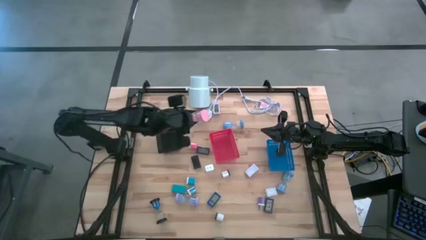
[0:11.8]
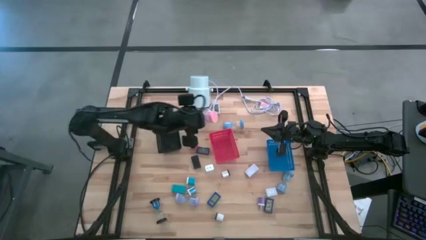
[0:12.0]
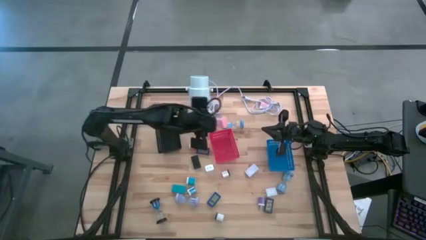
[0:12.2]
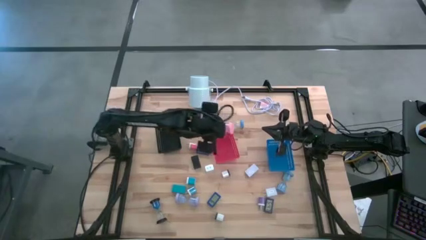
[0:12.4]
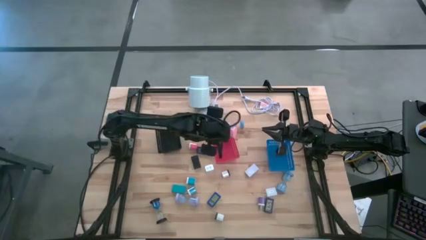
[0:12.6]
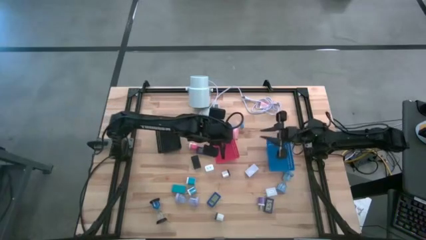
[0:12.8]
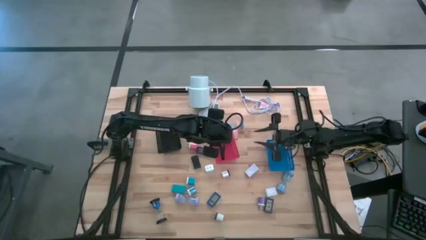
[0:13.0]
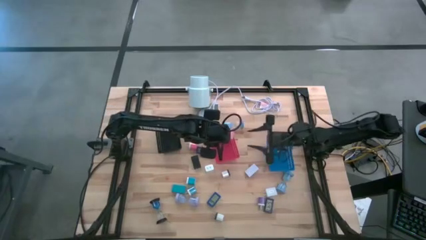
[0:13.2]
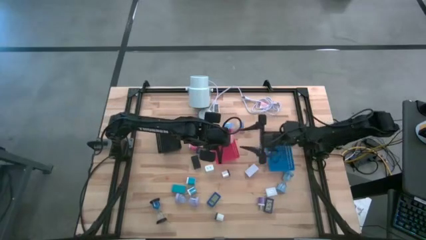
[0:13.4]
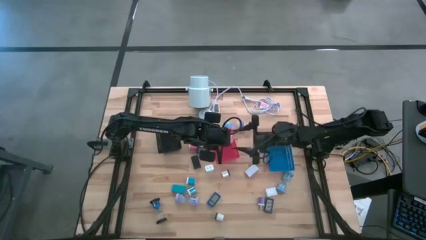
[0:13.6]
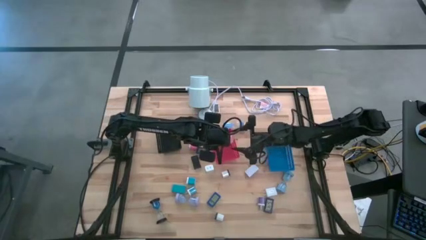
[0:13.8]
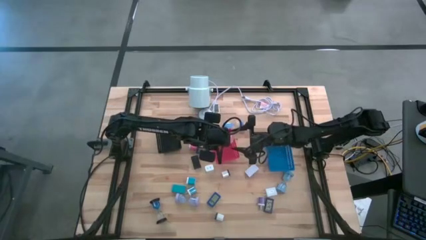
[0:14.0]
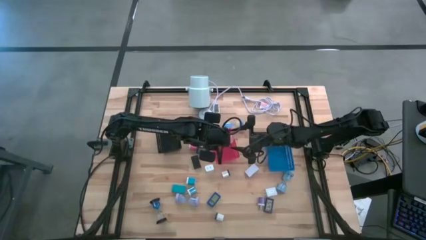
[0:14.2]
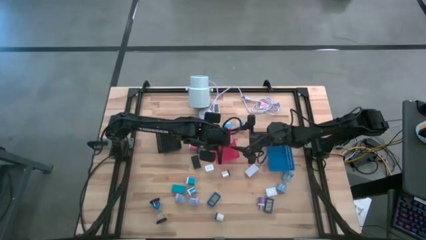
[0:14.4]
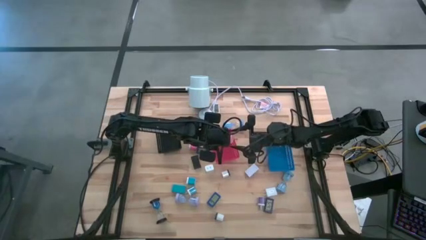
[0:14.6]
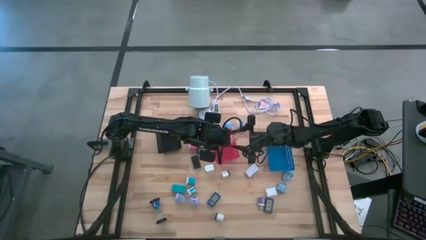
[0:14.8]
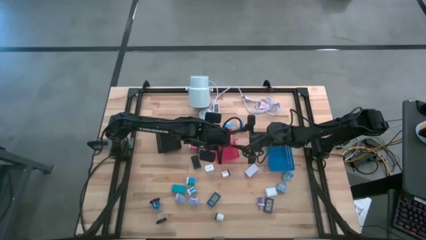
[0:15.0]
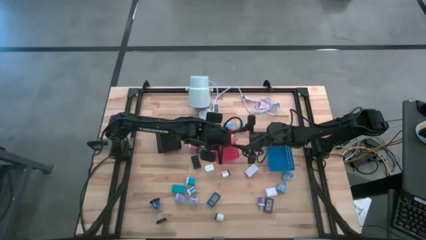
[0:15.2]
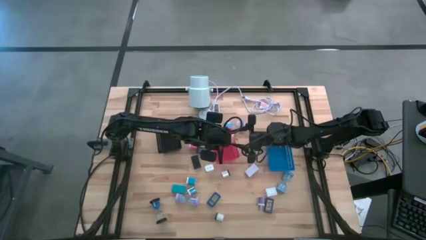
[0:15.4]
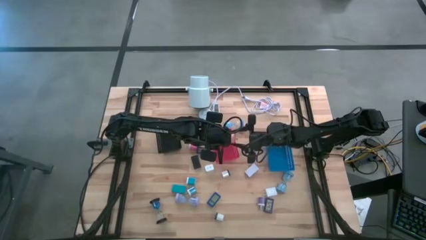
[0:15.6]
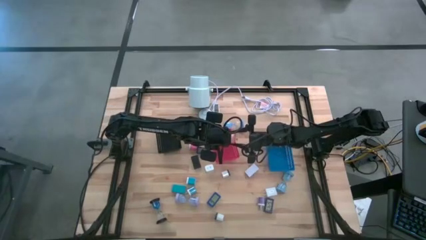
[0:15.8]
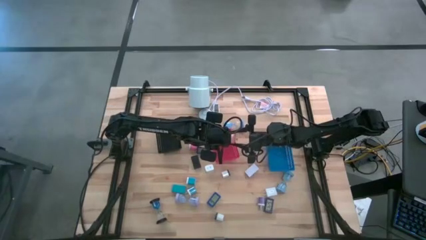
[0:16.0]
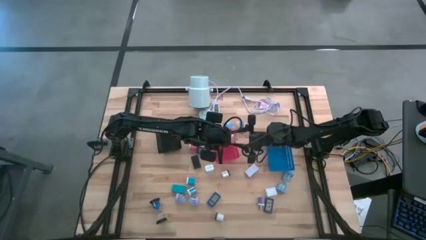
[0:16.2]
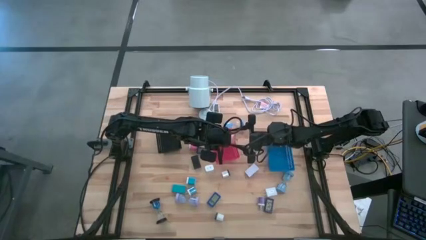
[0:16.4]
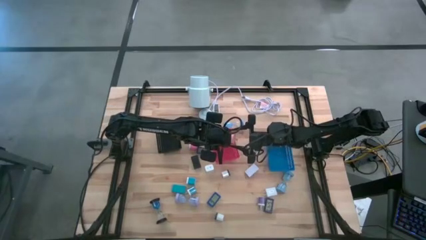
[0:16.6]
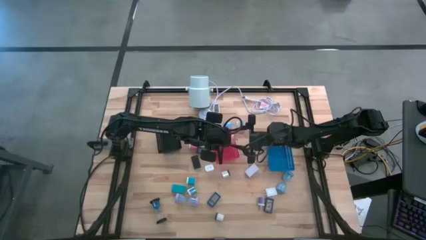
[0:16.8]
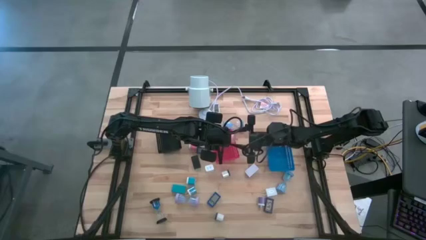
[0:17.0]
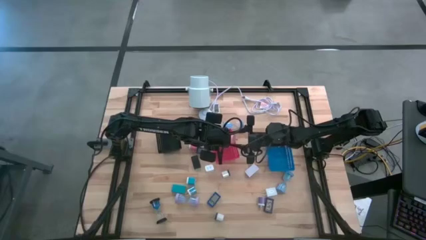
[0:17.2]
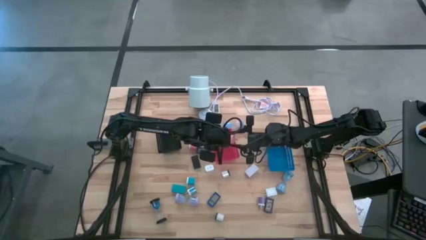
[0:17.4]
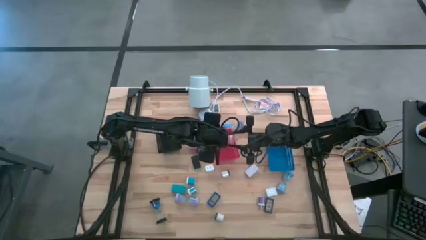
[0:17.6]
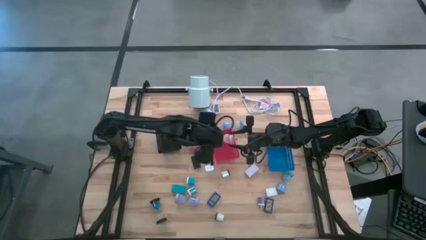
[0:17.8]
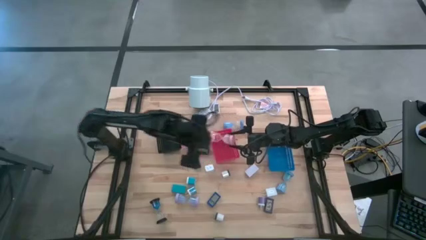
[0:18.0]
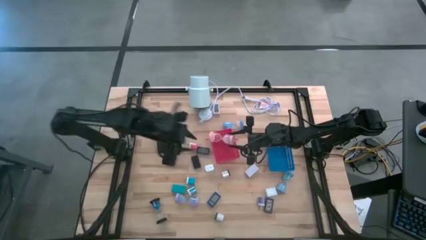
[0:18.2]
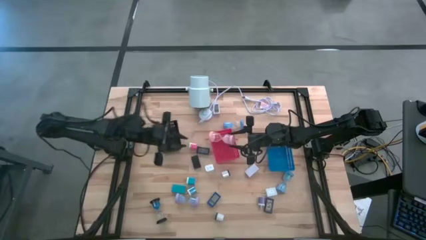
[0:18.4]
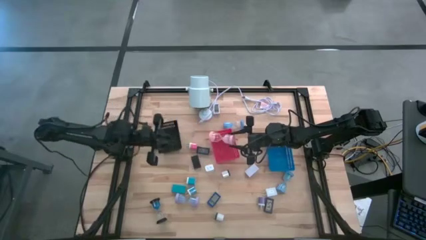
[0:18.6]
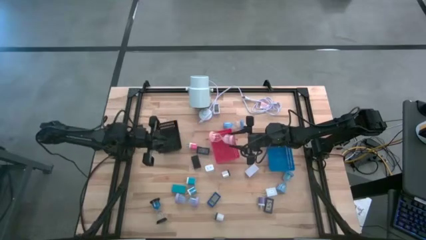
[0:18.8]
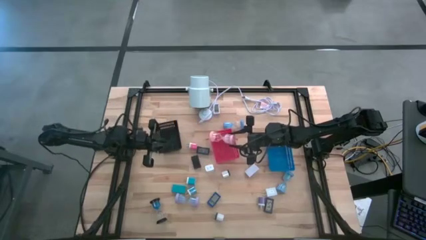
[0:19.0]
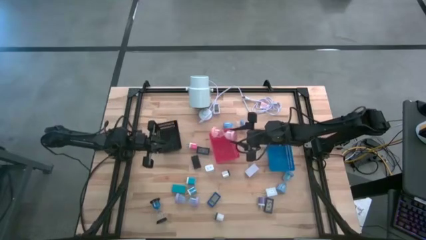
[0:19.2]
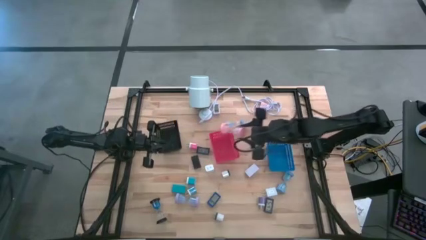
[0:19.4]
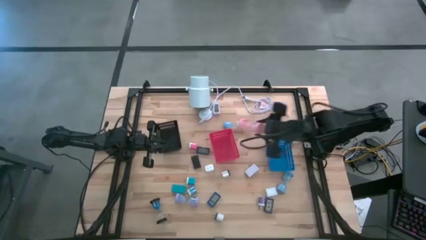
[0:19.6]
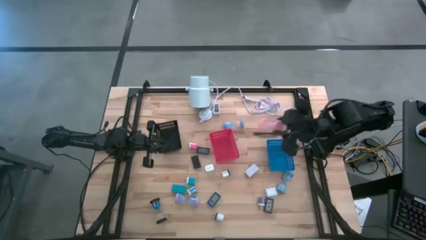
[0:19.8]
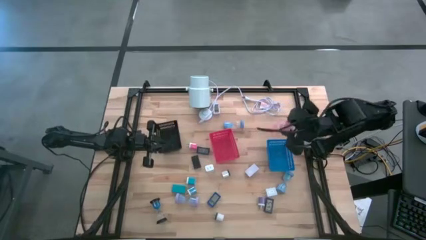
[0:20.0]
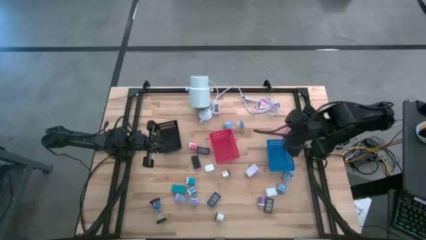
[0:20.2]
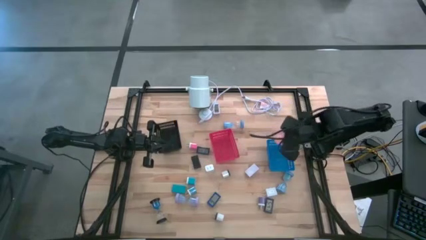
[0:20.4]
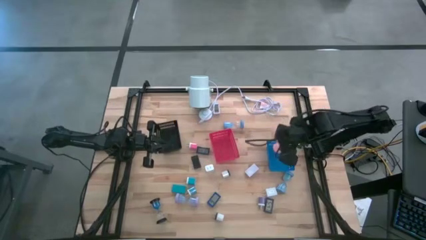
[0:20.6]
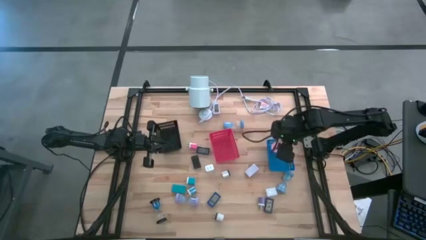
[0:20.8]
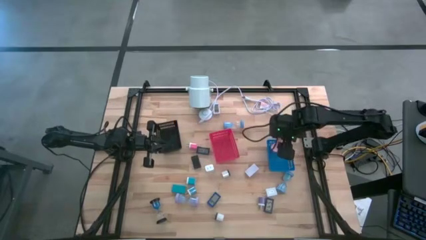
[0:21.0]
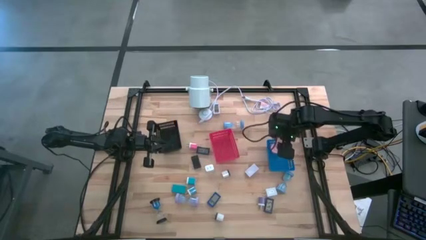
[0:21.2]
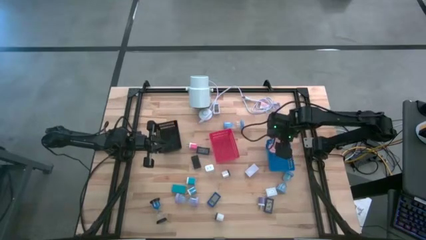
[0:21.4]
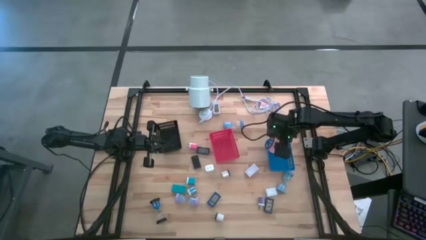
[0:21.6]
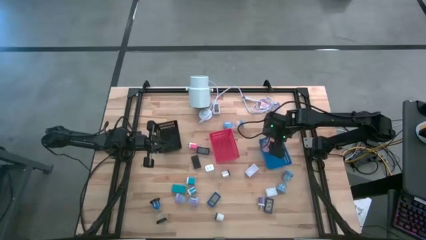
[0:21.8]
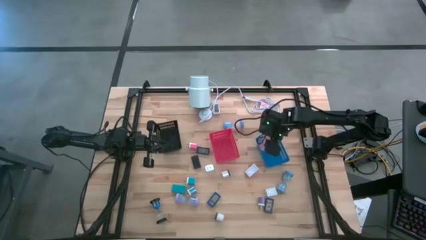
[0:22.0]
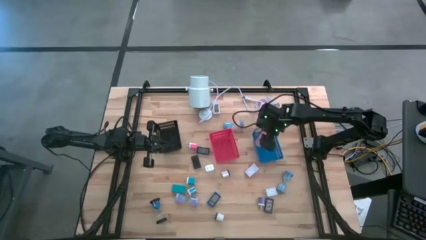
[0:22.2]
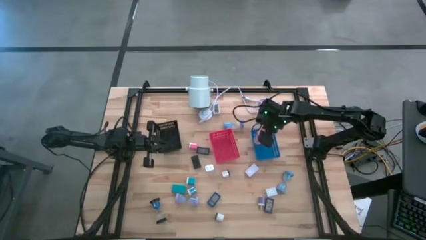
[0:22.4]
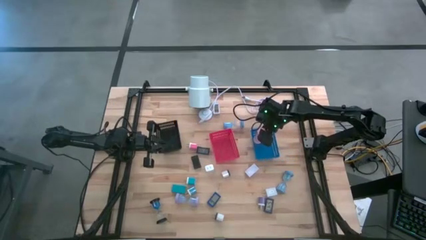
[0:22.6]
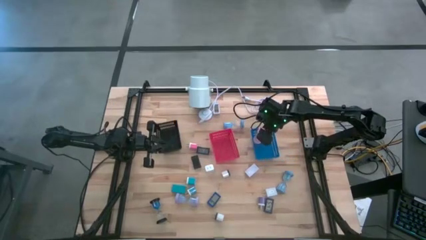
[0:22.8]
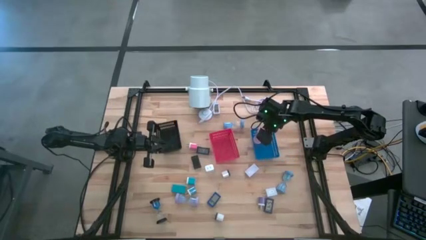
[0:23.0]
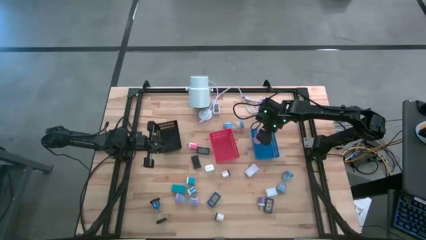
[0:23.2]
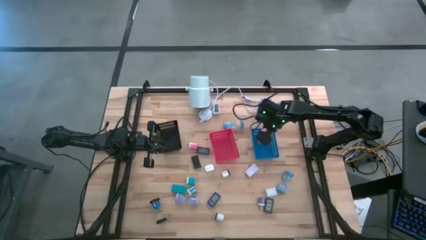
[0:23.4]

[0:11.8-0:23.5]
Task: Pick & Place Office items
Put the pink hourglass into the blue bin

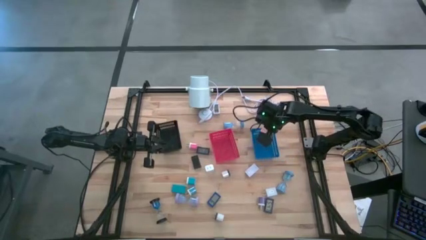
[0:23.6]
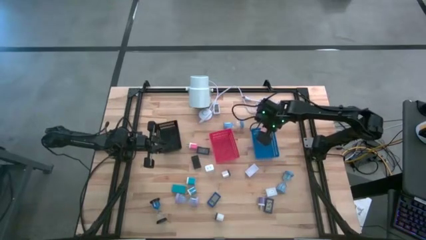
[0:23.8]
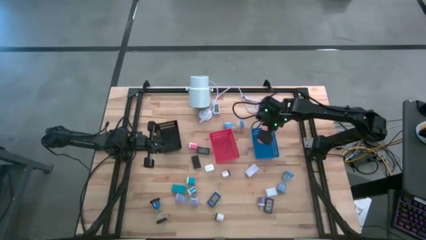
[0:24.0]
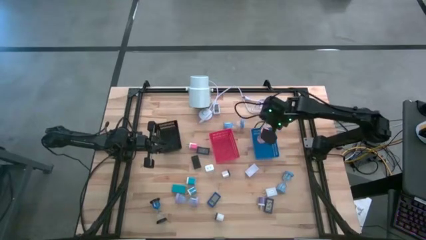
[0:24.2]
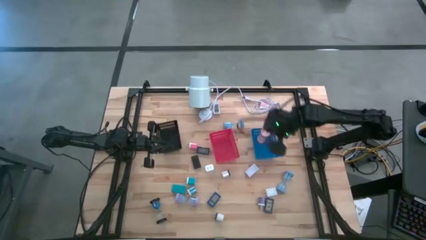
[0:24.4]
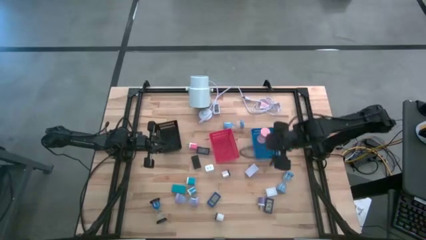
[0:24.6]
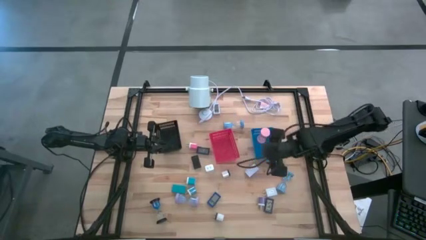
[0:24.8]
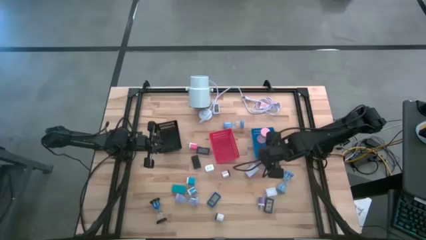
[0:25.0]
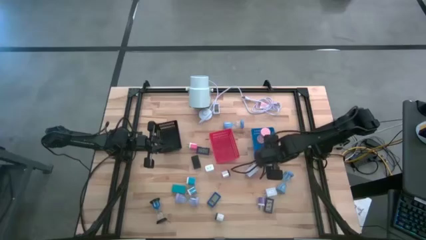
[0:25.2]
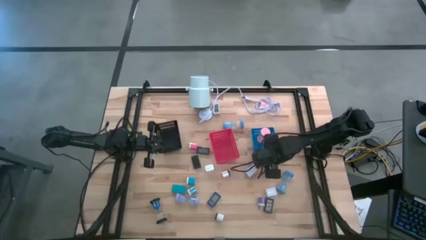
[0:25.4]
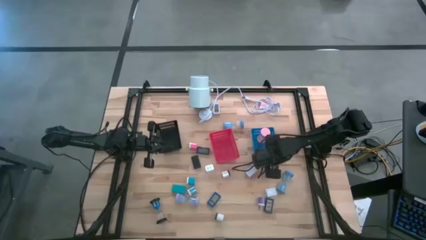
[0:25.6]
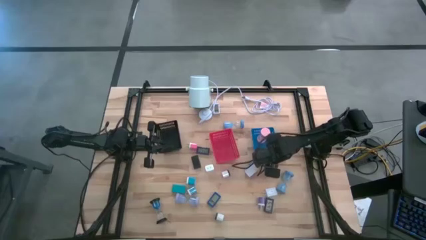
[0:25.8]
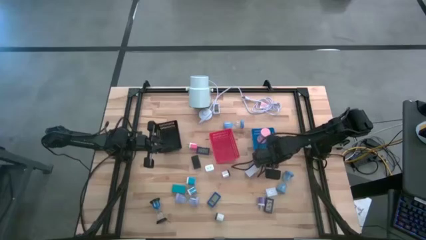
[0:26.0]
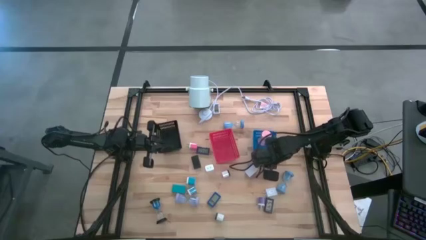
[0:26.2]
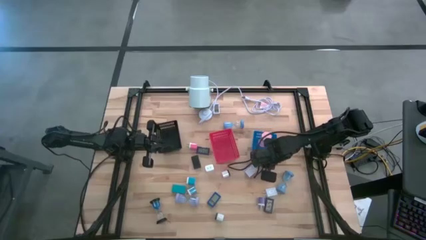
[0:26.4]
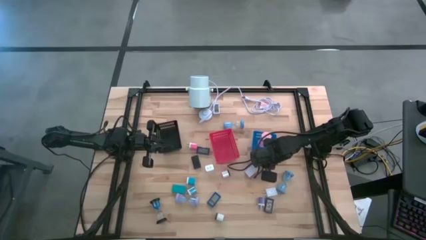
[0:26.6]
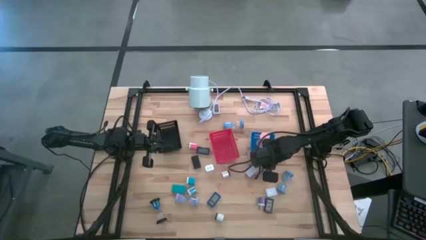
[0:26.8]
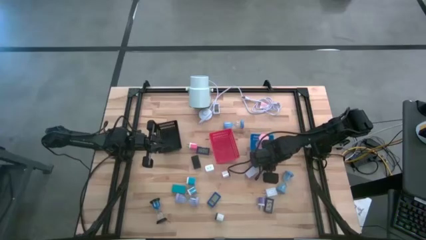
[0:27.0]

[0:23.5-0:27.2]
Adjust the blue bin

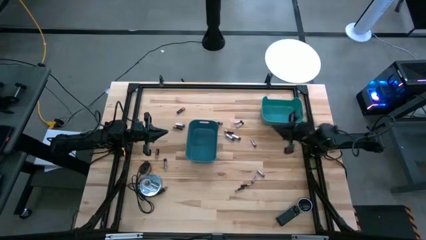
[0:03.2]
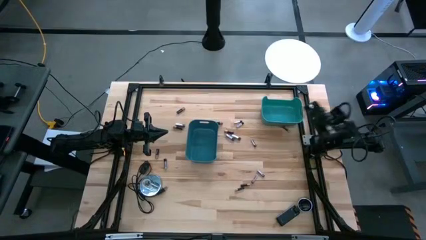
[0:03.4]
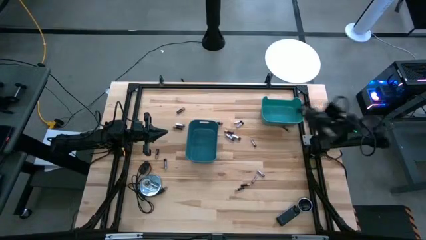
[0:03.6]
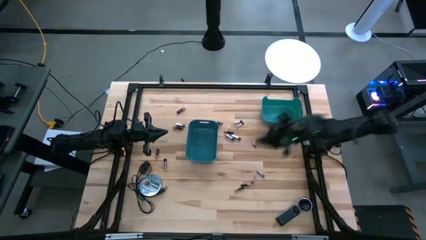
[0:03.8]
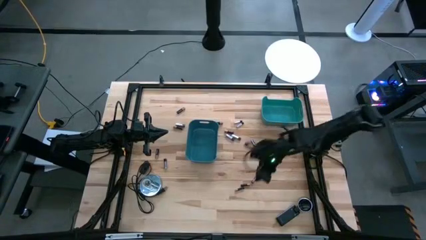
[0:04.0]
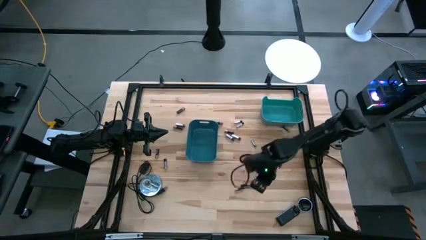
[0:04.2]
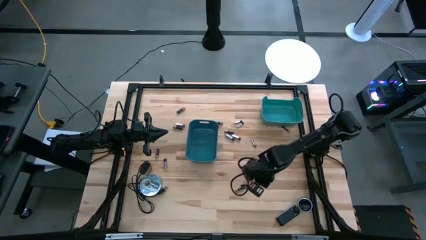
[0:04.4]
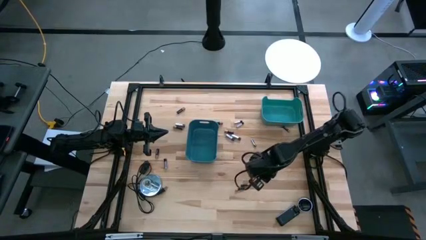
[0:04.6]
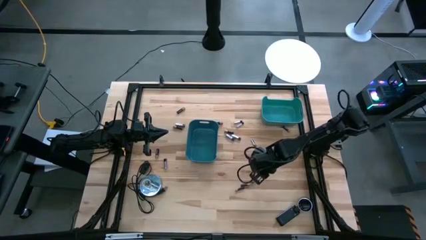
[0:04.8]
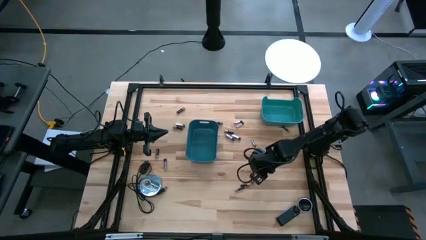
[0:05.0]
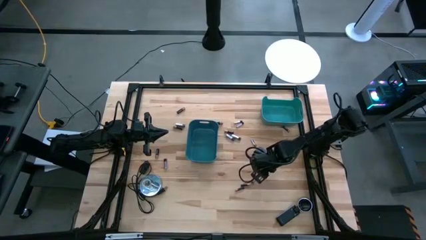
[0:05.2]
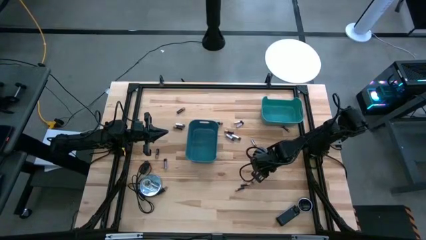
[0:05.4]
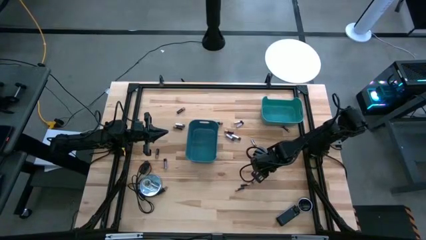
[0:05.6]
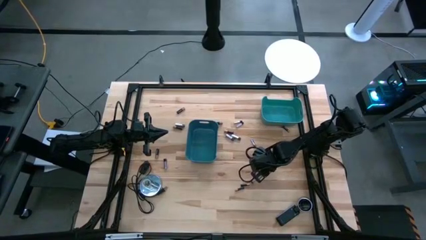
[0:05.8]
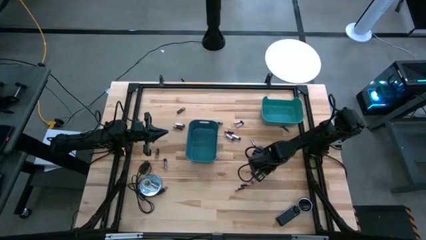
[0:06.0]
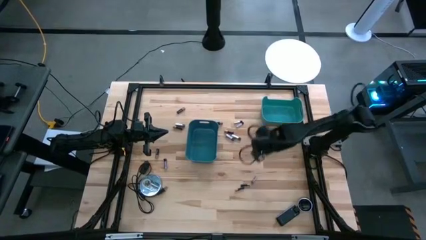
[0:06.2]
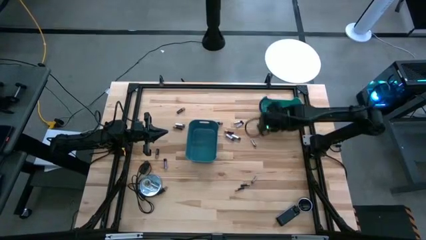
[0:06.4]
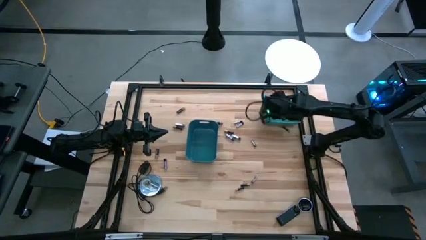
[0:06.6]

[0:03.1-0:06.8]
Task: Sort batteries
Put the silver battery into the green bin
